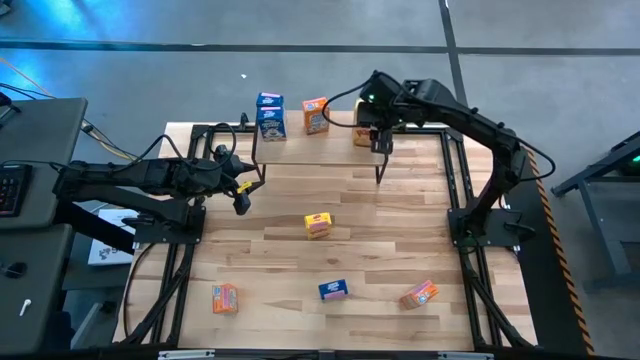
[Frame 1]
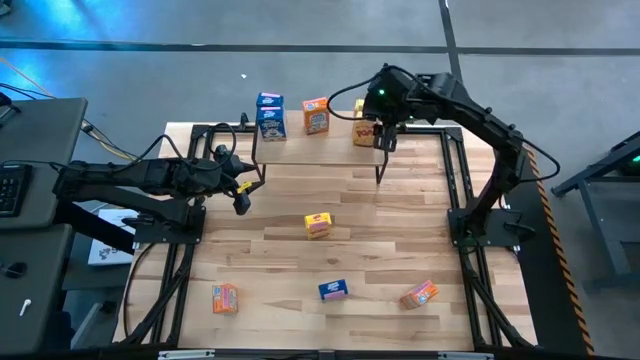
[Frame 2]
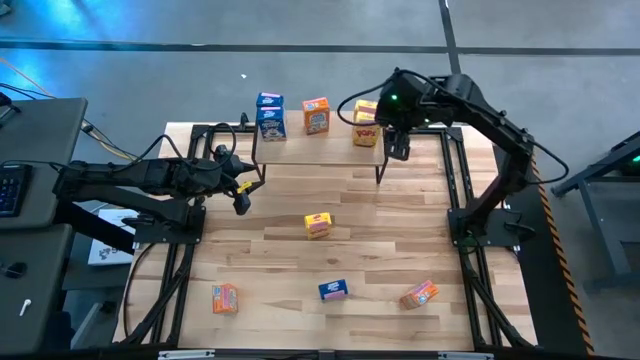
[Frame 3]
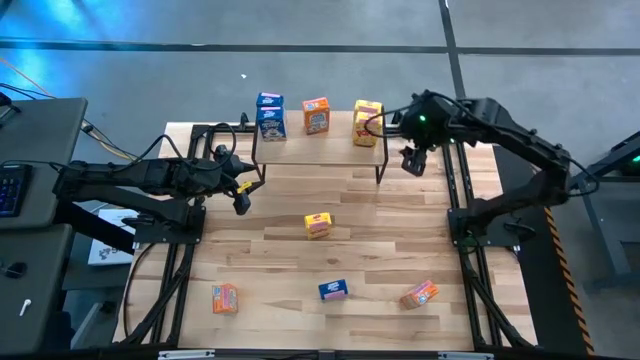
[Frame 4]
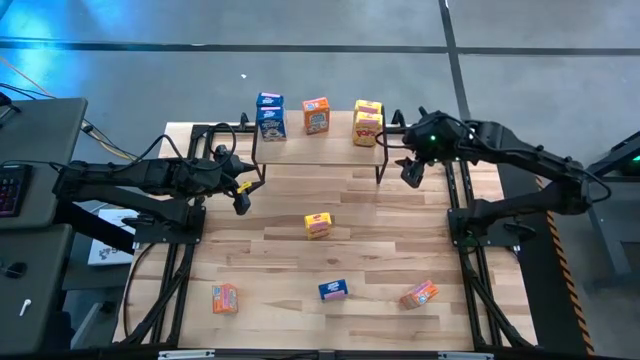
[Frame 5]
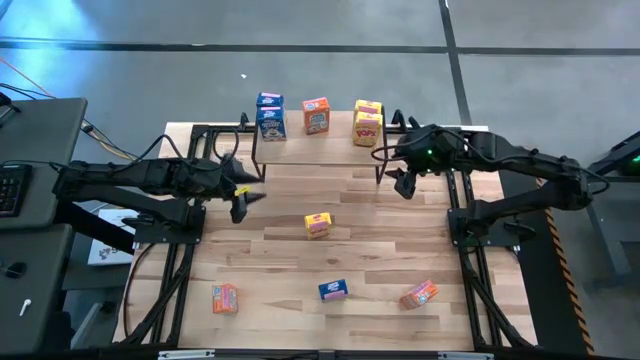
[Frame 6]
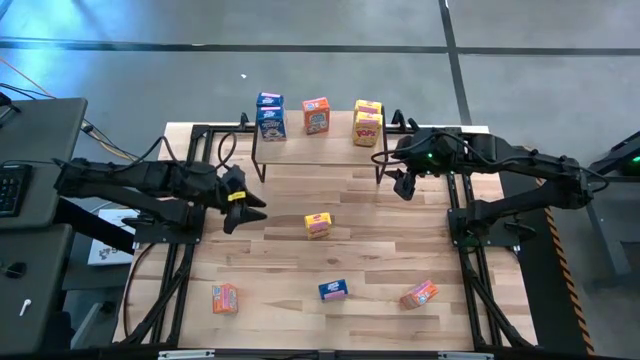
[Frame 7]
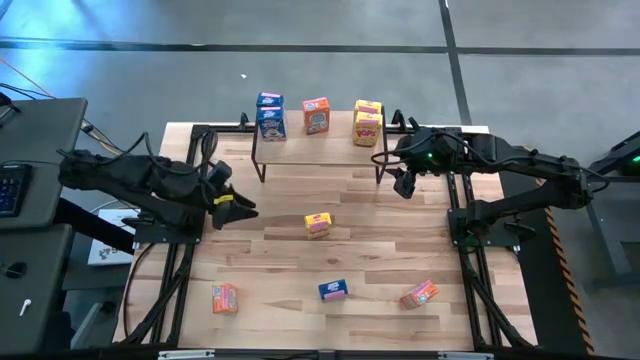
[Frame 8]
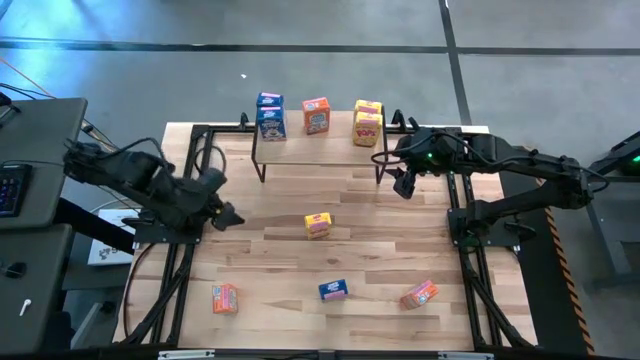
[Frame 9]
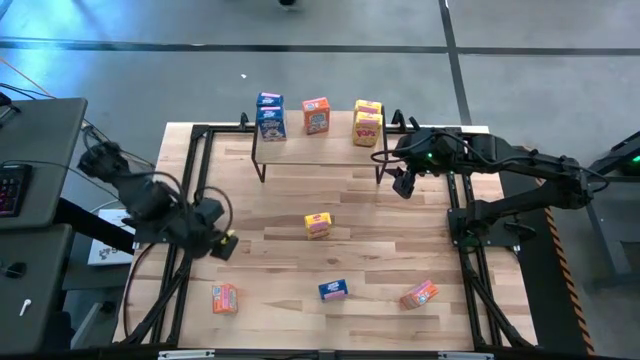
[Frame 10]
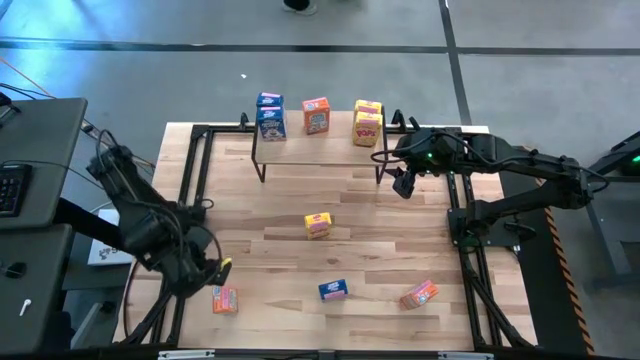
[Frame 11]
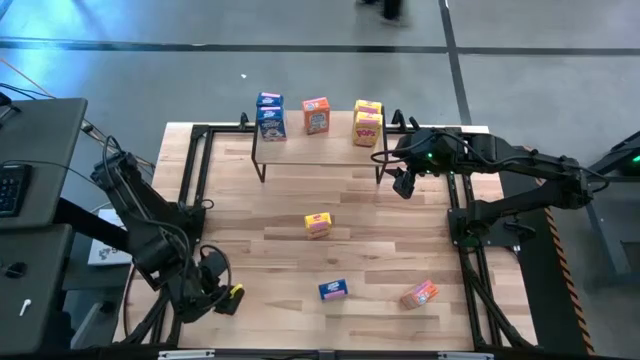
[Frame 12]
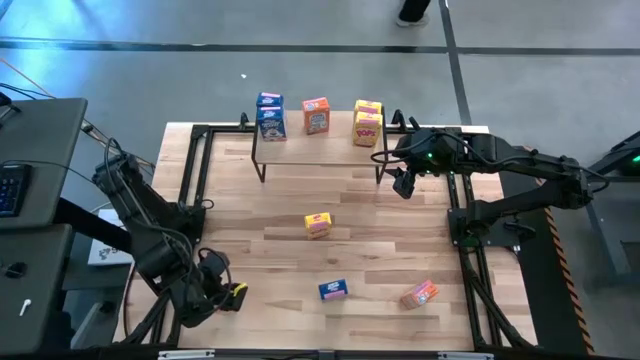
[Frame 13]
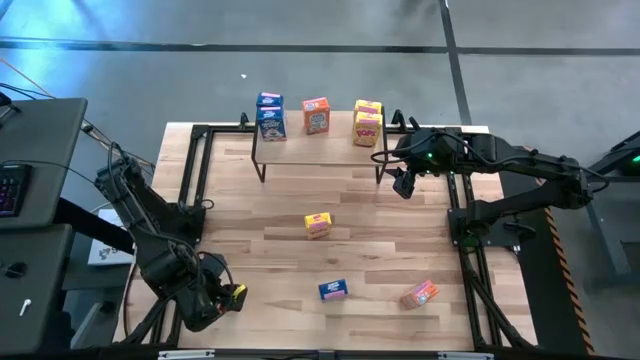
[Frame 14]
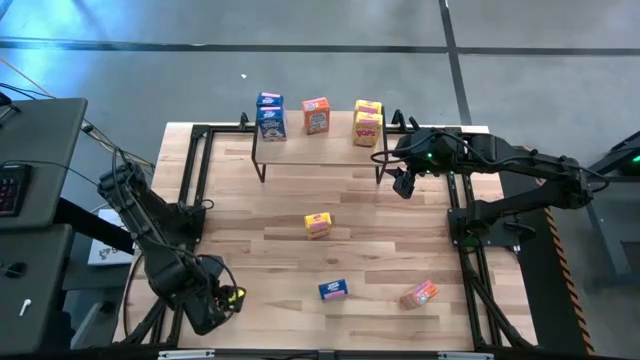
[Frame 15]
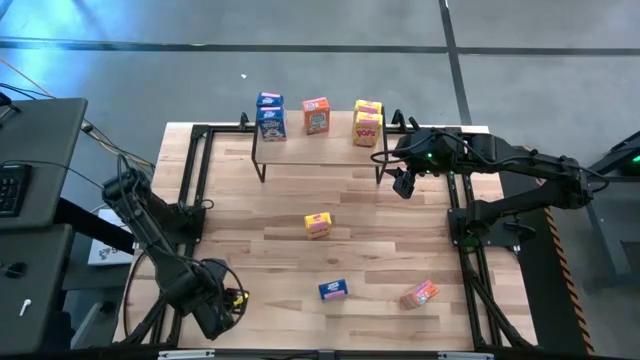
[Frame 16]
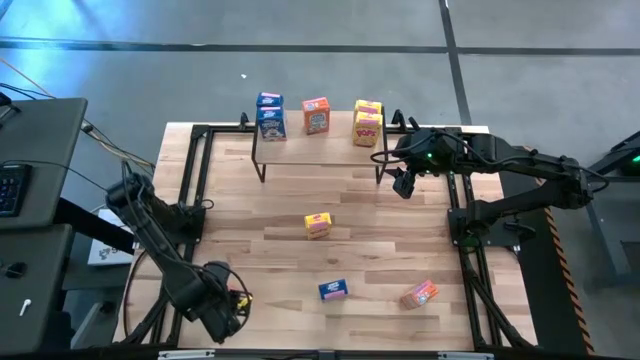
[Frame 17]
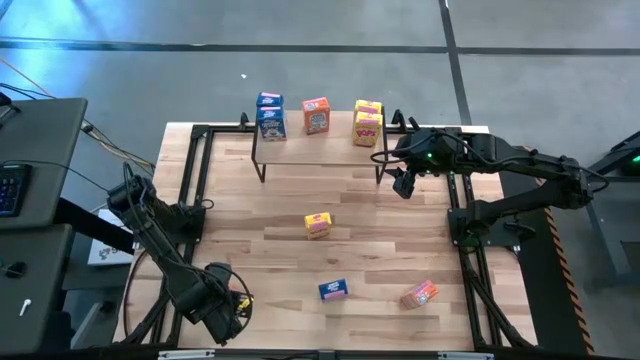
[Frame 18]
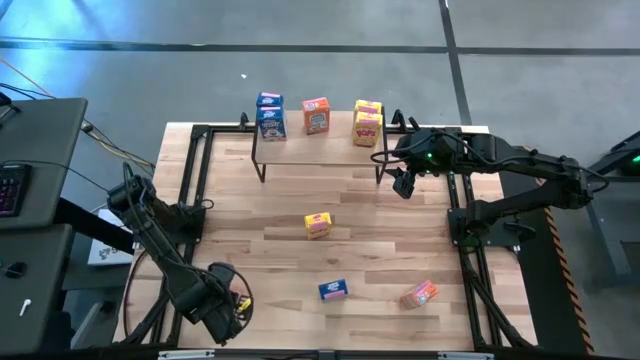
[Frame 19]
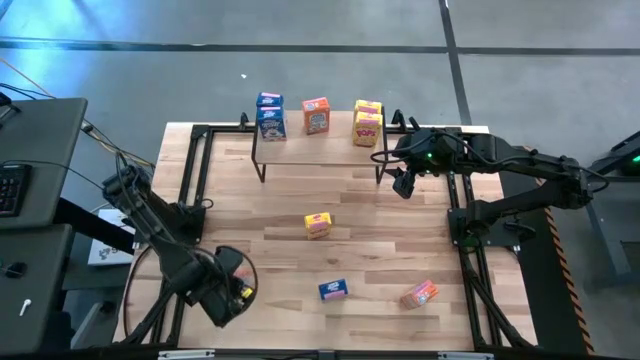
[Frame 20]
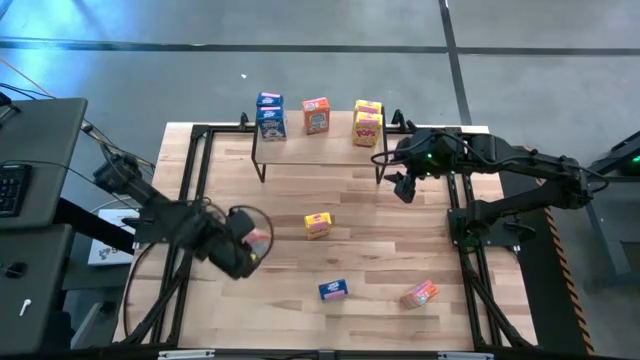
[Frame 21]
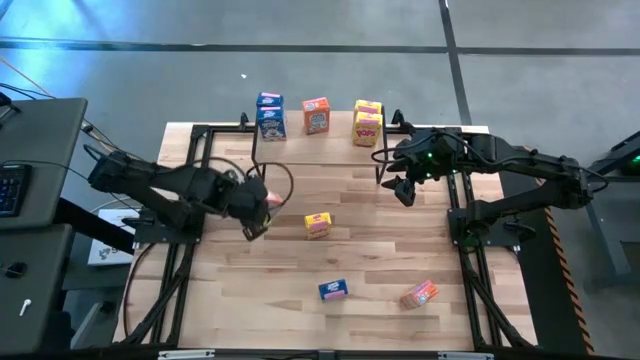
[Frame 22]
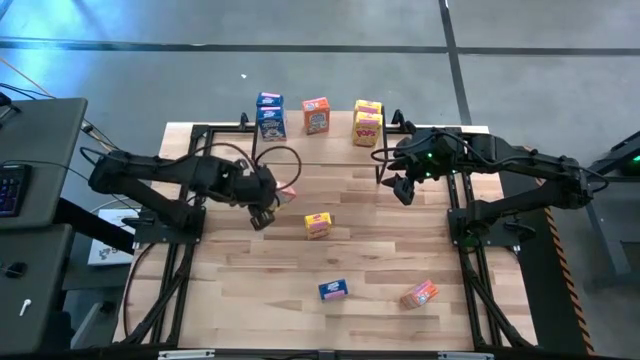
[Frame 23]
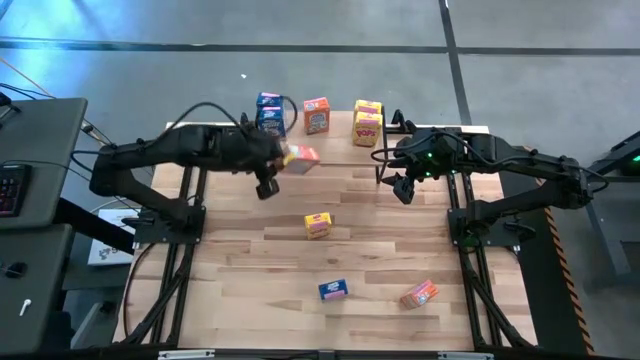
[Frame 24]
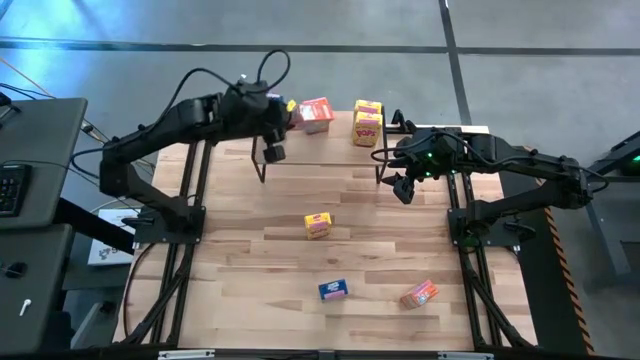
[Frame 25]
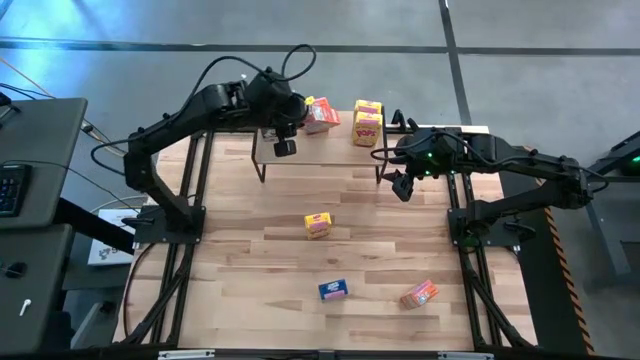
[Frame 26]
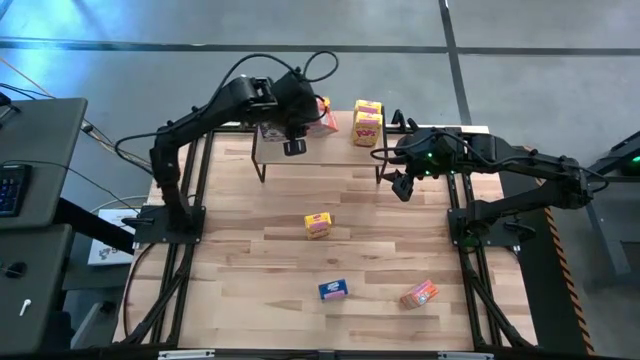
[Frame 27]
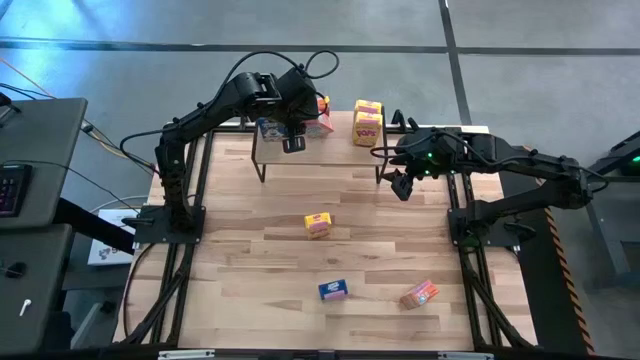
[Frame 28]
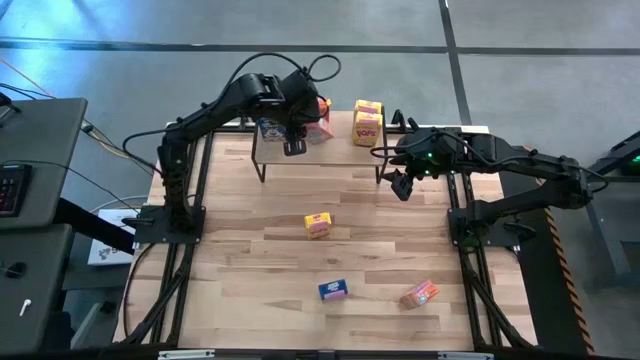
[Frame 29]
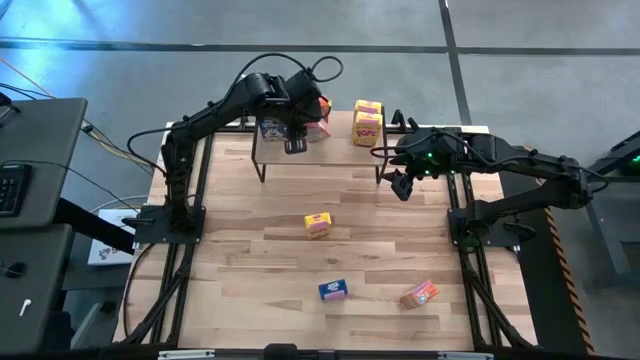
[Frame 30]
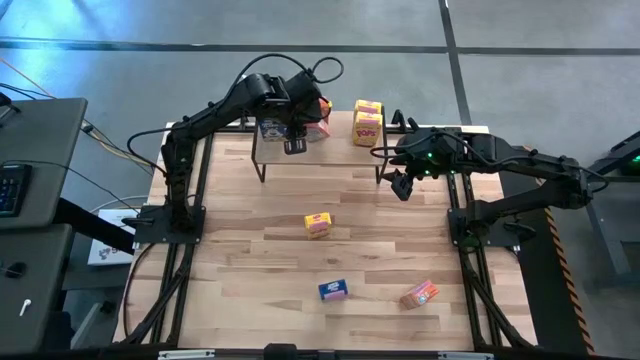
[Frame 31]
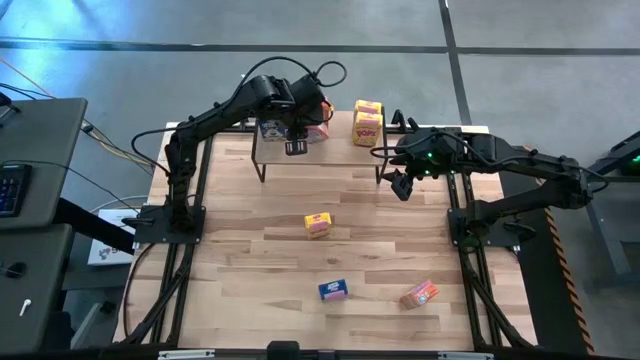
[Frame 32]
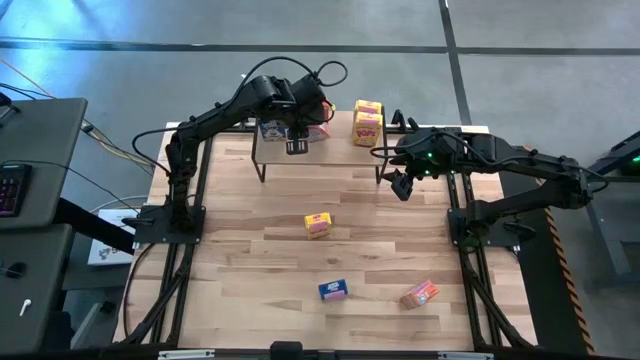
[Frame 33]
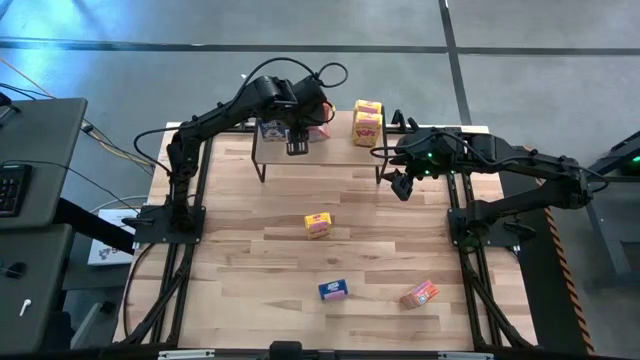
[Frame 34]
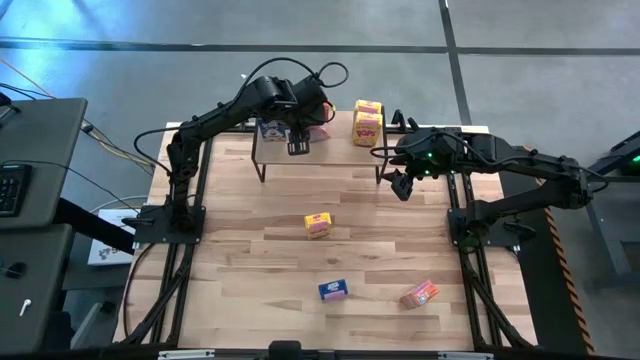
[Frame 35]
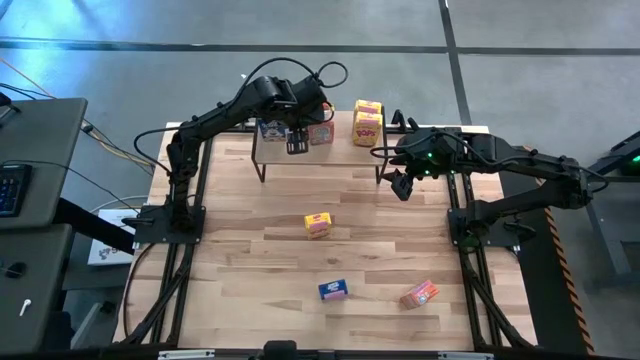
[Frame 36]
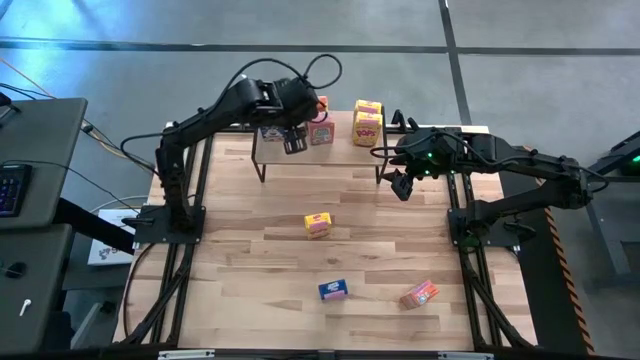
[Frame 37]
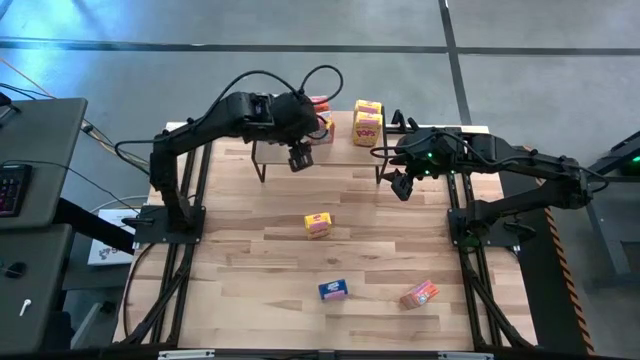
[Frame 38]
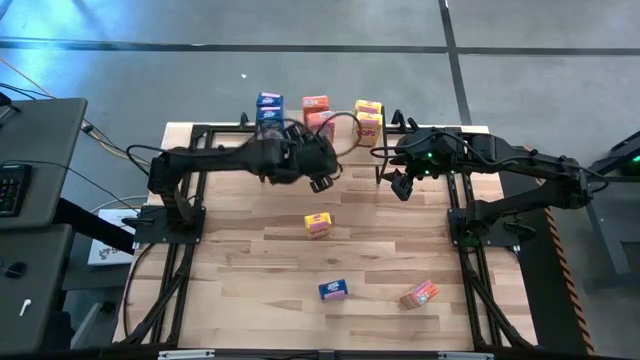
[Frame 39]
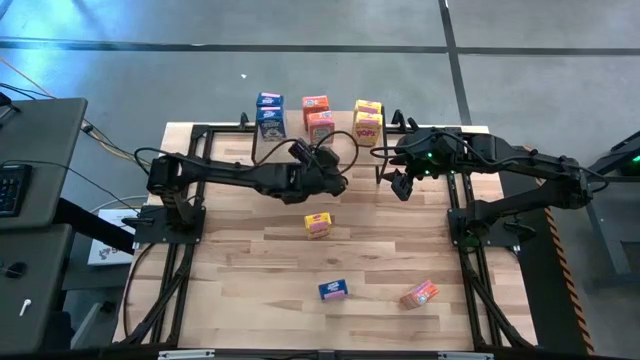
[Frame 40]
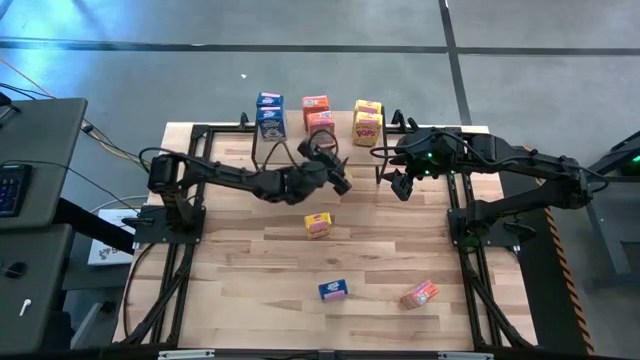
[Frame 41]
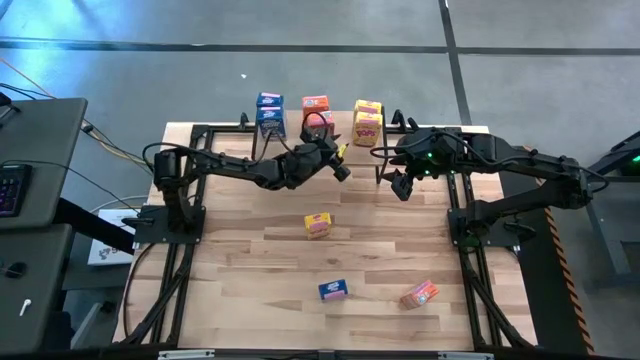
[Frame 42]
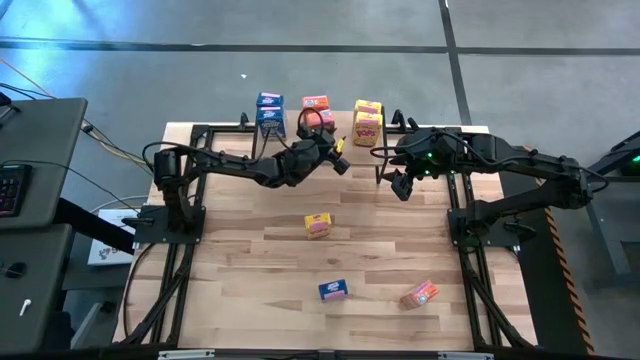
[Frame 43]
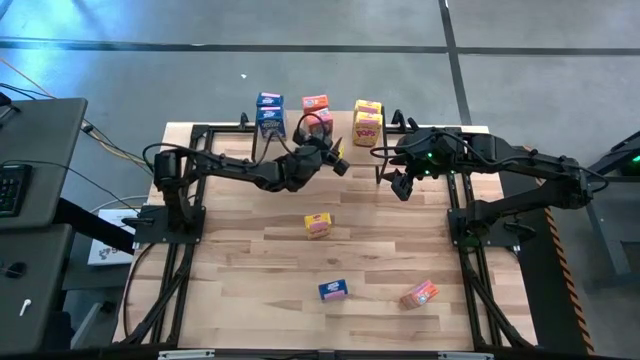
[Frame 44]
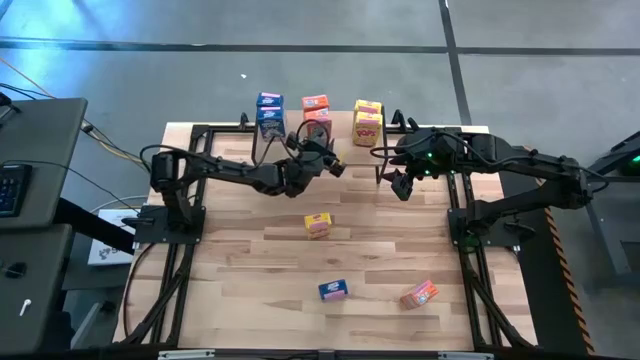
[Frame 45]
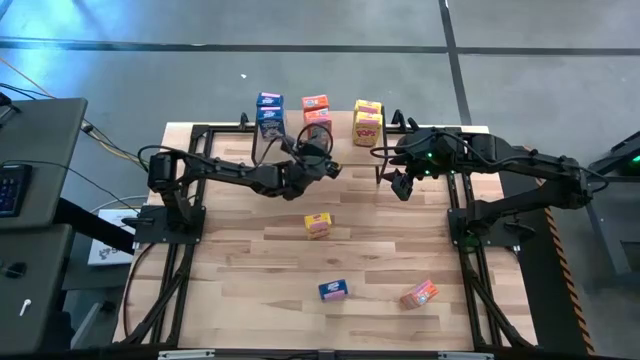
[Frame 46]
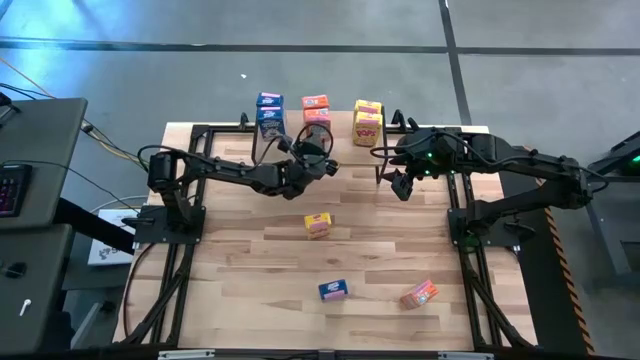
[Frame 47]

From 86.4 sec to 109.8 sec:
Task: Stack cereal on shelf
Put the left orange cereal box on the shelf aligned with the other orange cereal box
